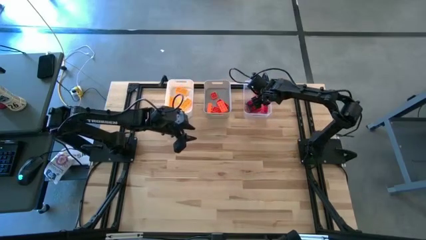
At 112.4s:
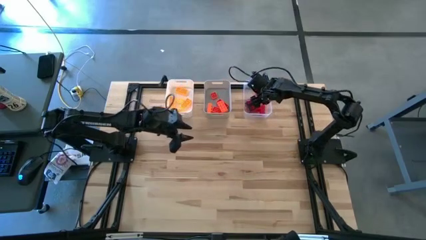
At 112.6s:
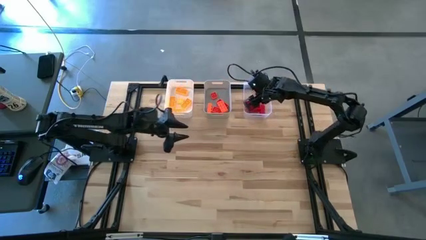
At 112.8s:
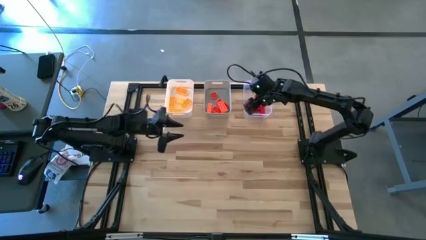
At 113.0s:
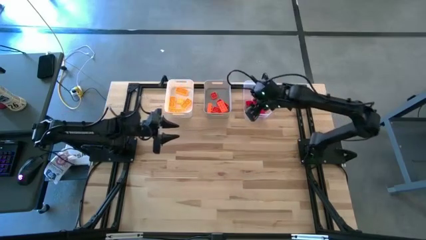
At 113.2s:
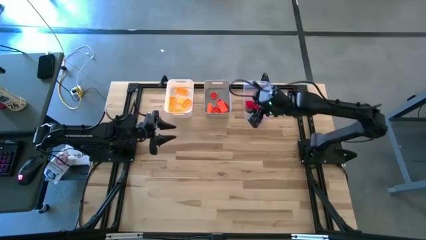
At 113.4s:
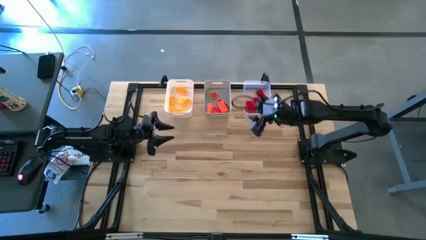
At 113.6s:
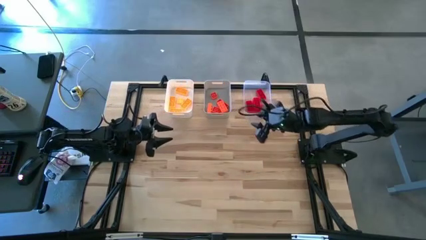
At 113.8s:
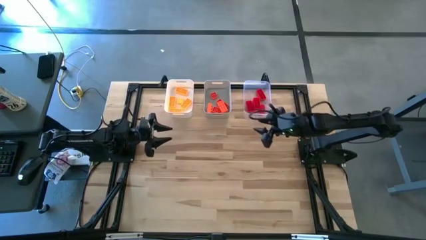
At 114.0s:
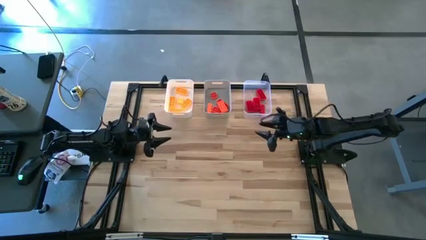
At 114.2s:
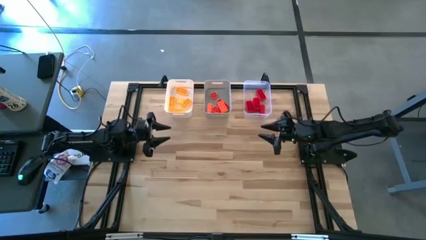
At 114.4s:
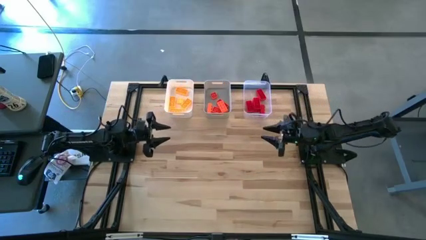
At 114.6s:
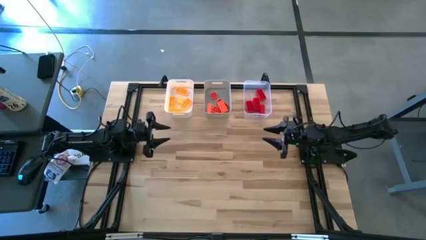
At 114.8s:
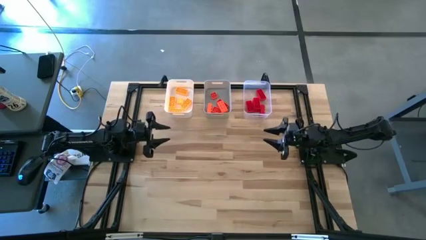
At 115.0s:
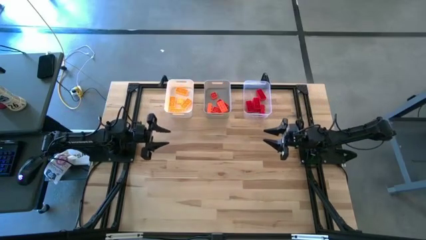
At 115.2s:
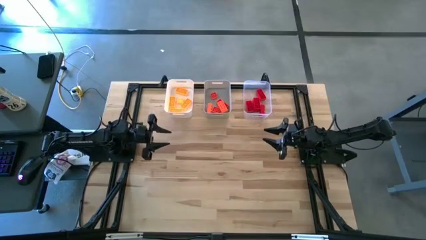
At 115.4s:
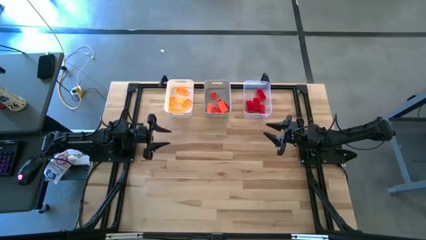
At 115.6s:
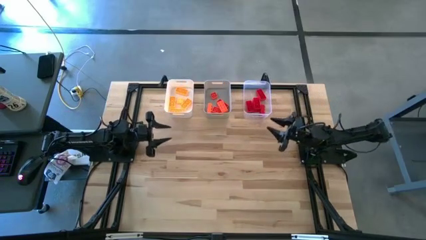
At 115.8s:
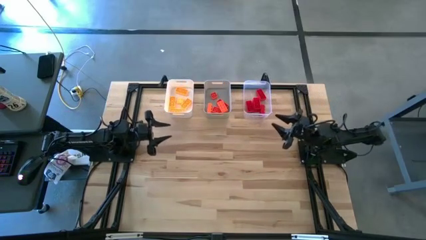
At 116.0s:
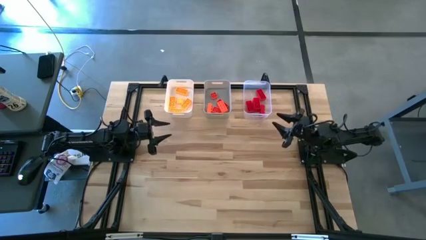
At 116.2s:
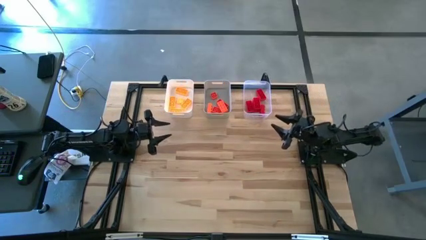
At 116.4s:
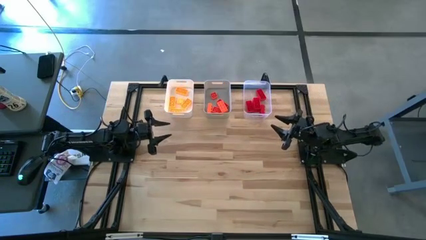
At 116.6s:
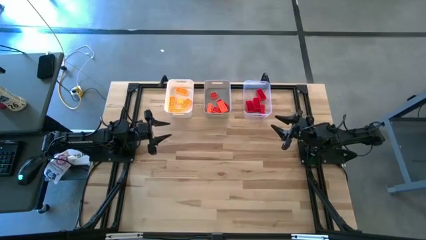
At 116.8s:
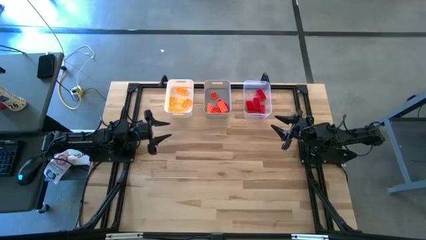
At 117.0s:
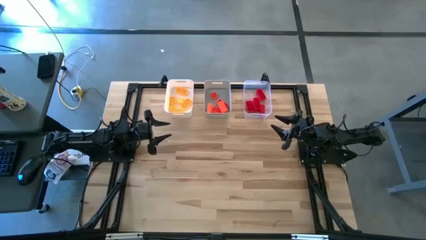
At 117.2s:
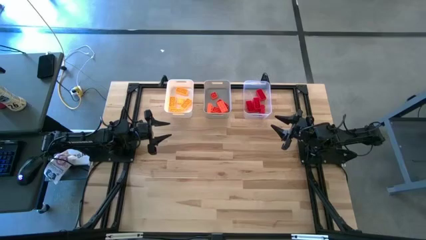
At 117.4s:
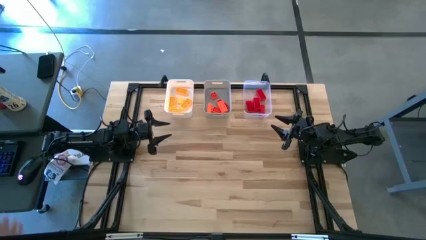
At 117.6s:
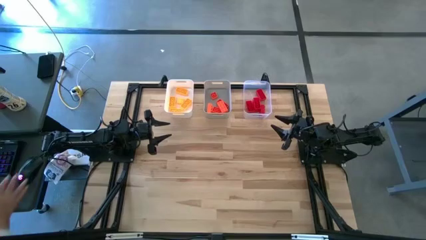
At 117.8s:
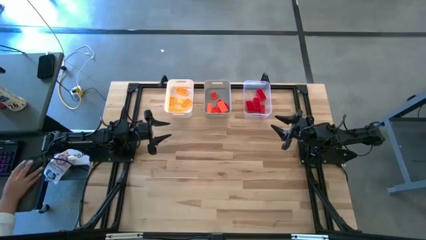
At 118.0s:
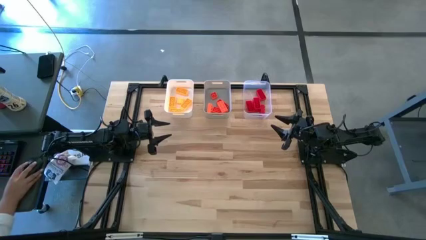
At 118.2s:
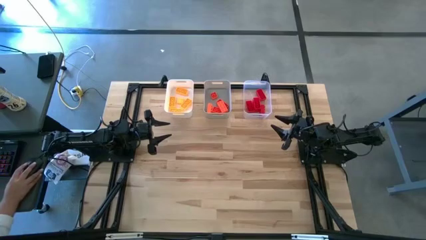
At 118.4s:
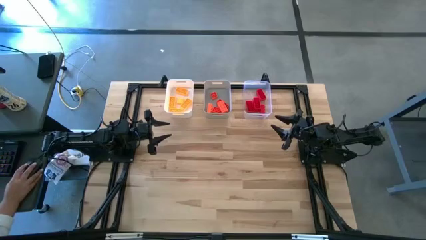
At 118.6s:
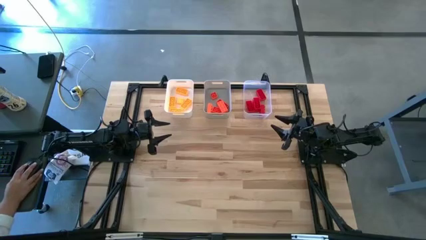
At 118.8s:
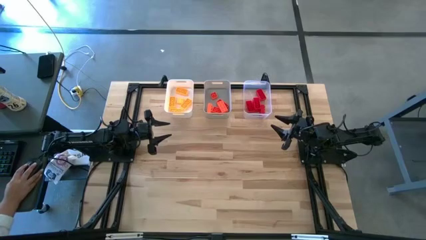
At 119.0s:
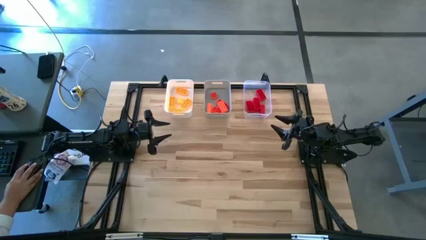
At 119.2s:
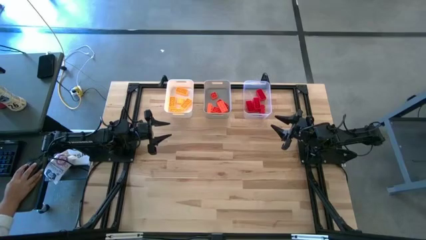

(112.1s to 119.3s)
Task: Sort & place blocks by color
Return to Home Position

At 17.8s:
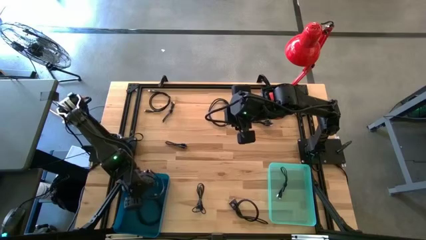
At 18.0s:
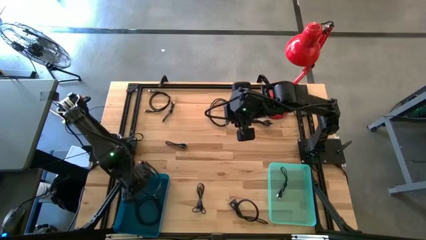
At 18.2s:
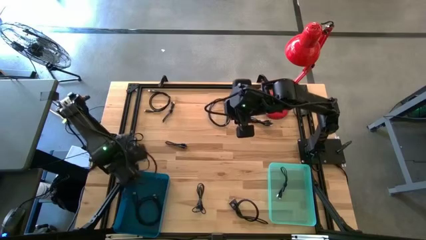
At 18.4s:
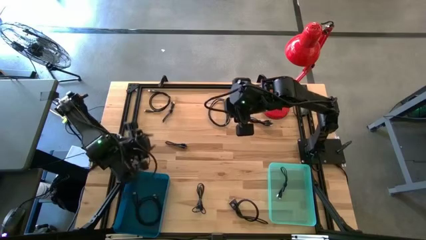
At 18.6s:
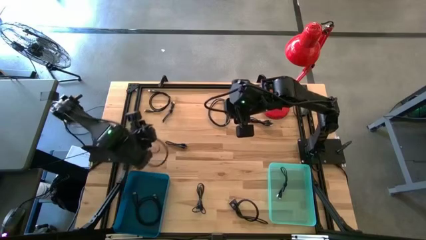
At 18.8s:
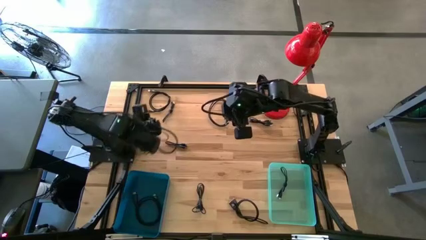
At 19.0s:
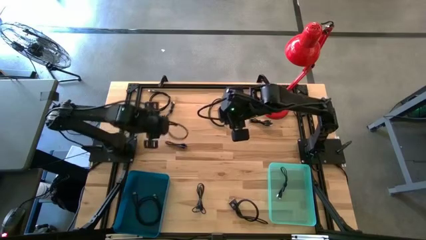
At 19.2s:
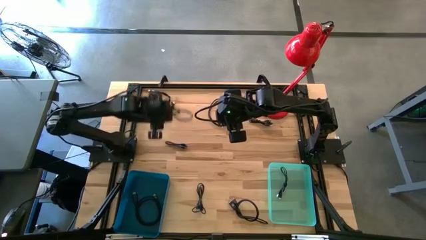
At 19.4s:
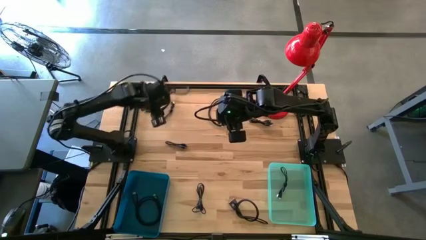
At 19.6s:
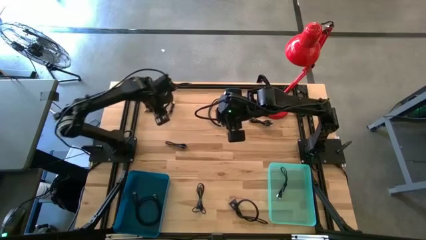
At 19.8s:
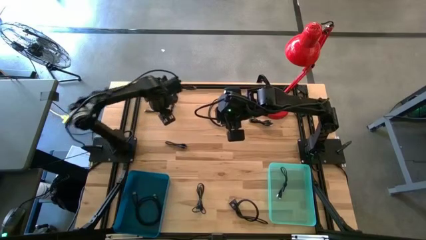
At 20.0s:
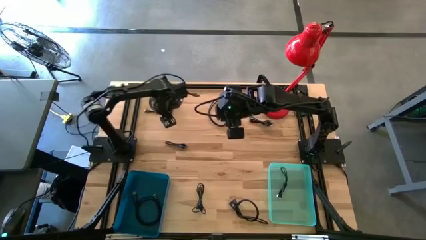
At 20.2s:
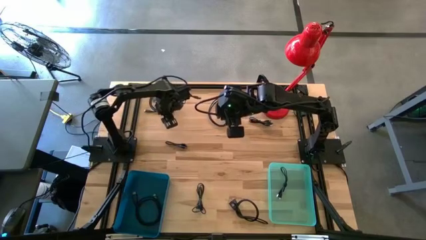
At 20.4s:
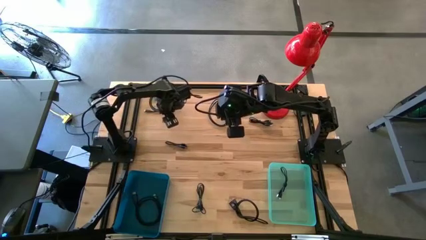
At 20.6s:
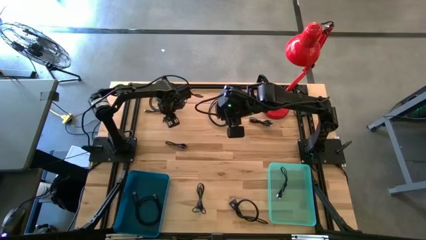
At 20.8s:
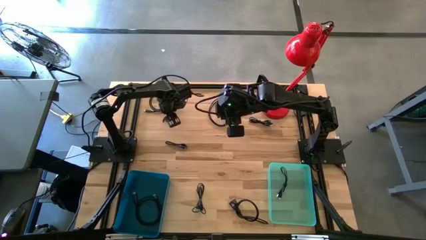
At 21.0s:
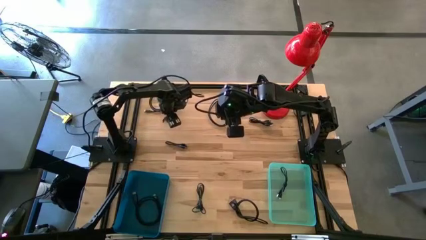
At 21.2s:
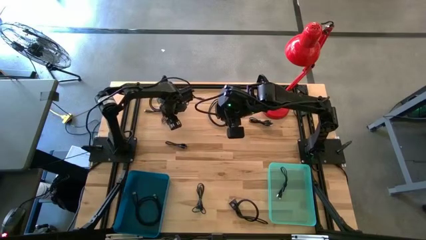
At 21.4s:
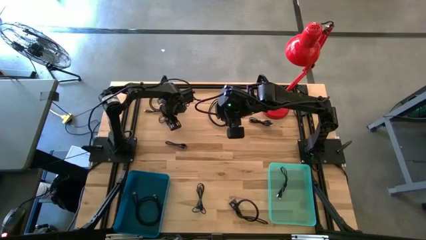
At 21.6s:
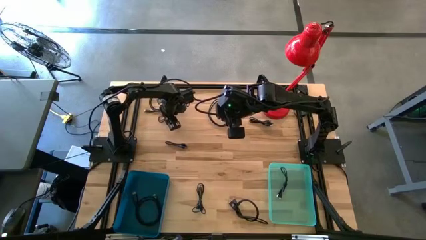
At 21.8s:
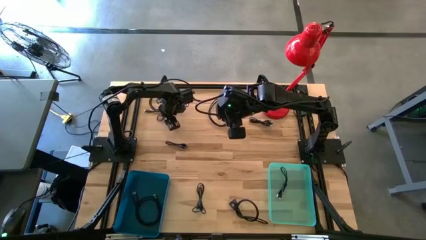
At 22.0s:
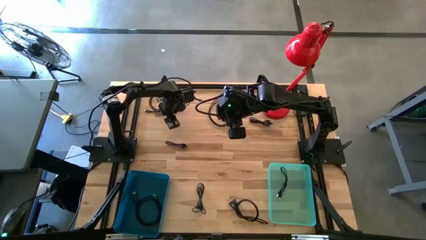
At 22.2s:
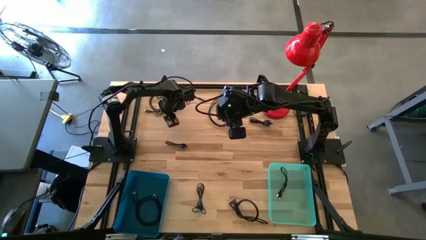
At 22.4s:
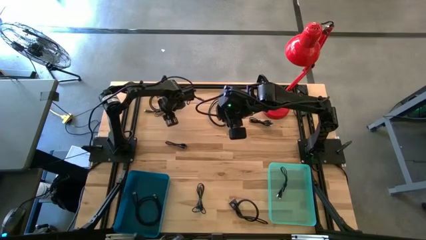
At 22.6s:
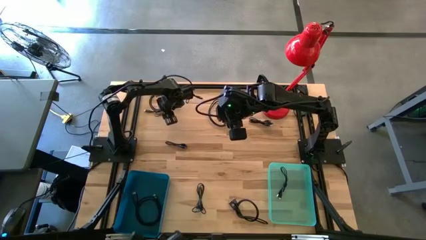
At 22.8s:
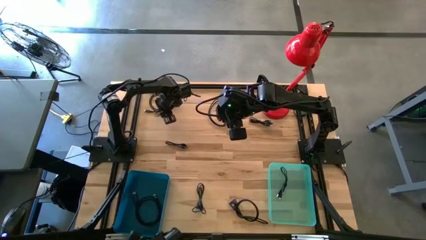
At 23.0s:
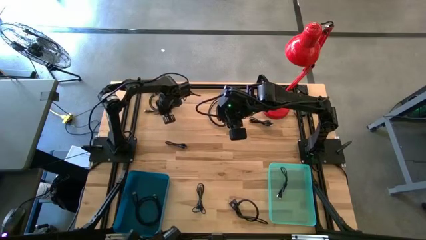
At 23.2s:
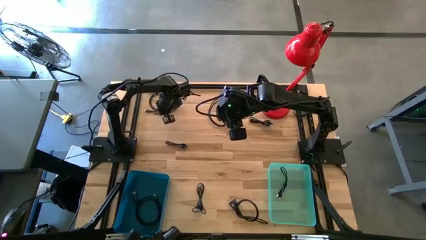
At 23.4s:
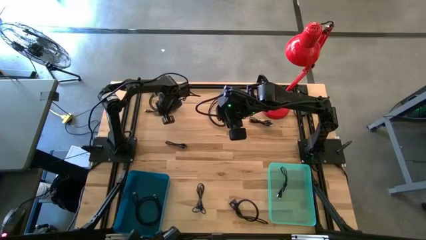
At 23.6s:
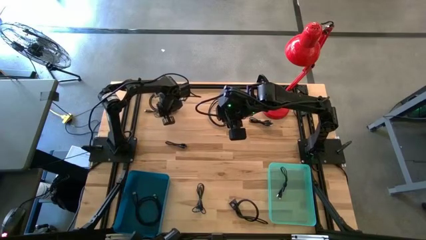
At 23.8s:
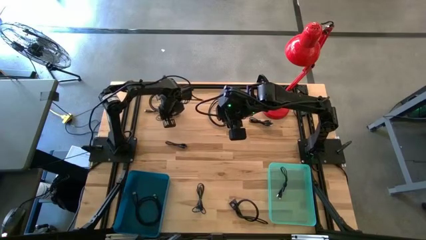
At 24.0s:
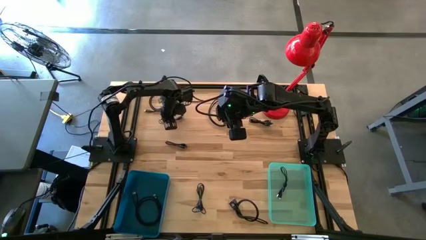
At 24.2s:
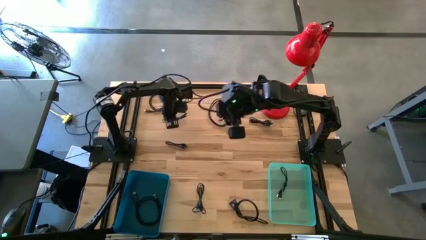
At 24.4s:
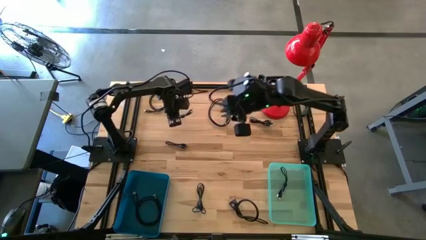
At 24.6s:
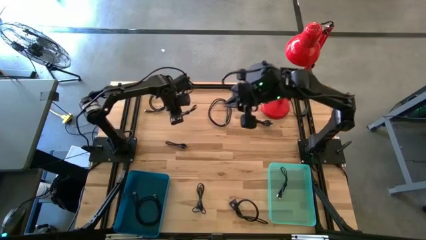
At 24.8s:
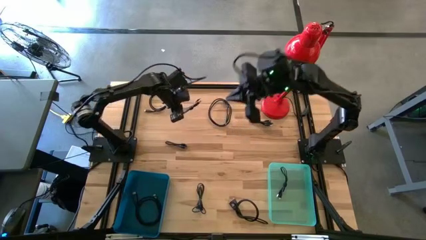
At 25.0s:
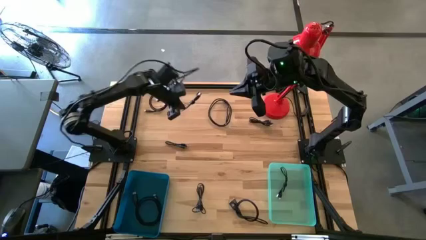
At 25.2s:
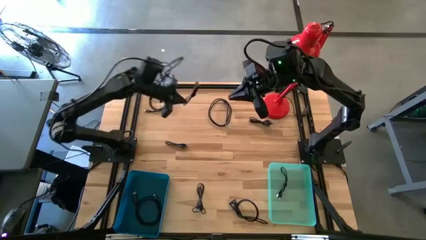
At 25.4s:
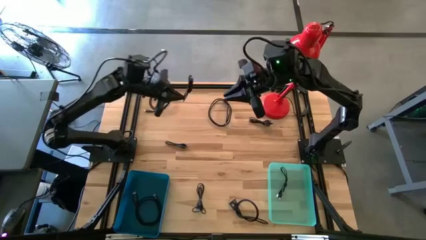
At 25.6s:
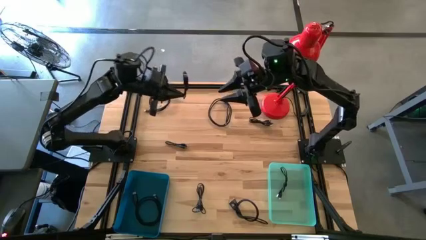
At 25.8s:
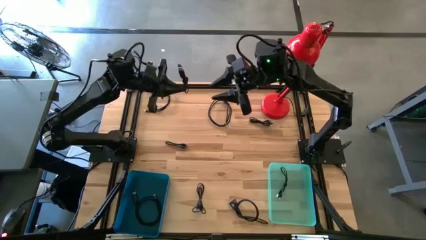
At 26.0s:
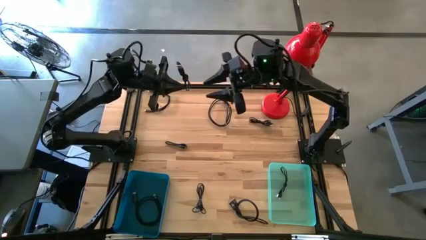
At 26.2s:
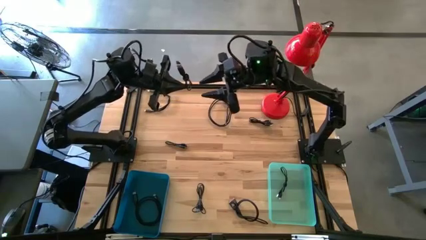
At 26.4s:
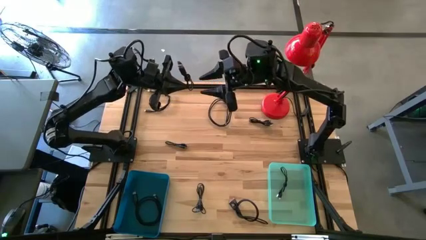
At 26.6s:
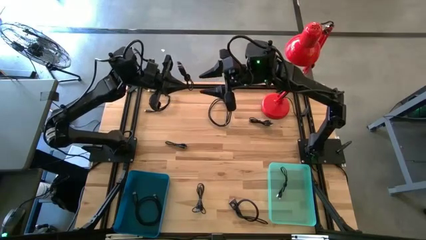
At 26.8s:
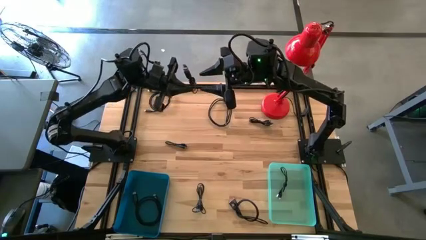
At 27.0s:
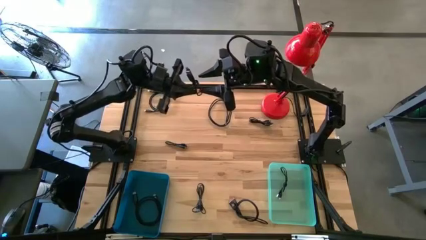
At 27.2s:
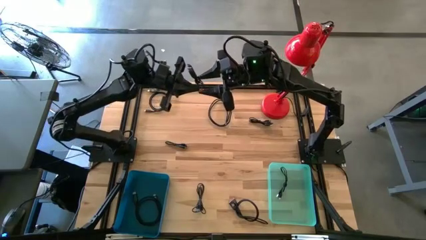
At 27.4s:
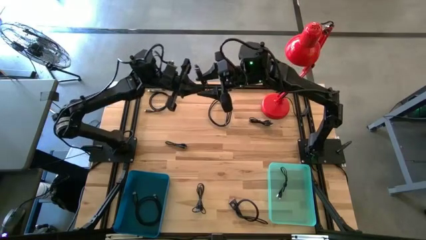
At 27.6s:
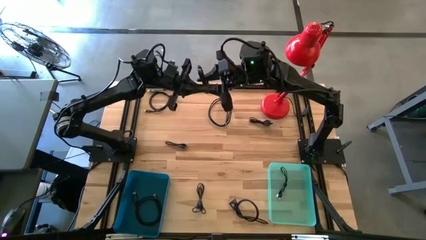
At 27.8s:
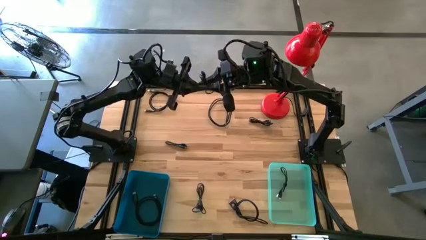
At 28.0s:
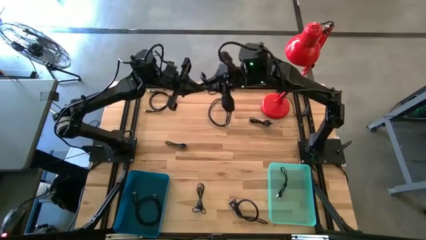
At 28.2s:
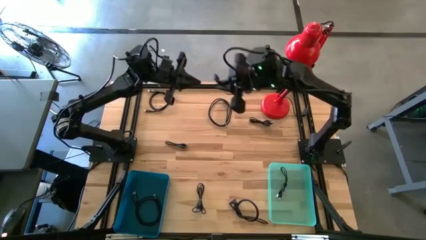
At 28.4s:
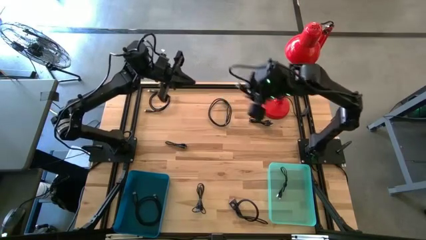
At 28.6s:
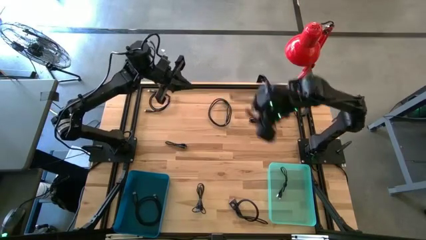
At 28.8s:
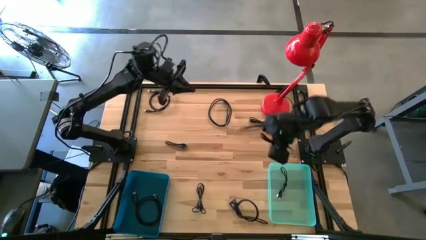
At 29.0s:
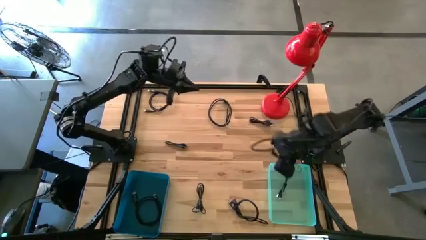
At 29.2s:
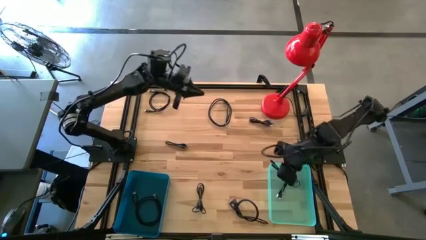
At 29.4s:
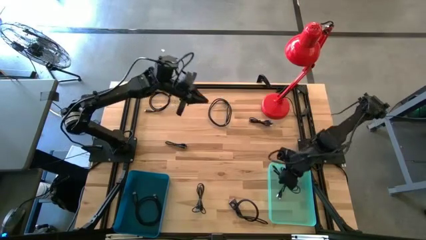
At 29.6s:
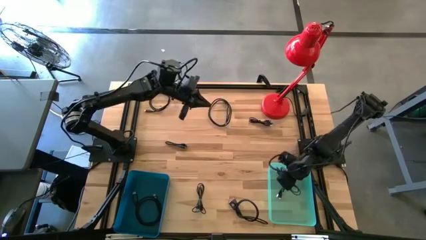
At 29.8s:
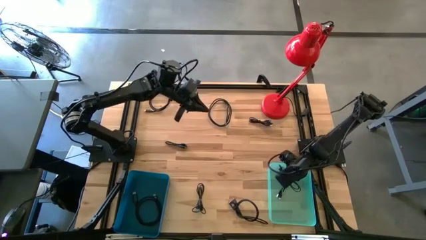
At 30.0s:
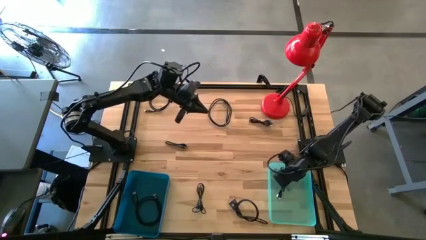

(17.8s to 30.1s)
Task: Pick & Place USB Port
Put the black charger cable into the light blue bin
